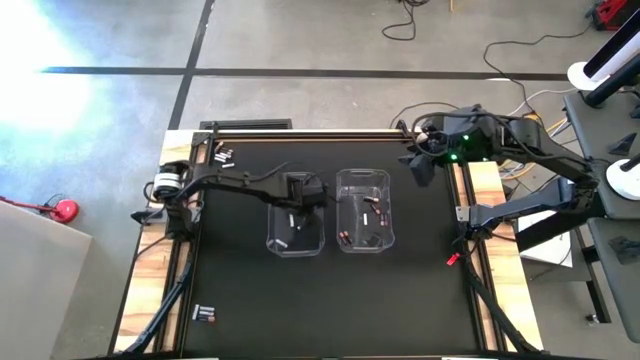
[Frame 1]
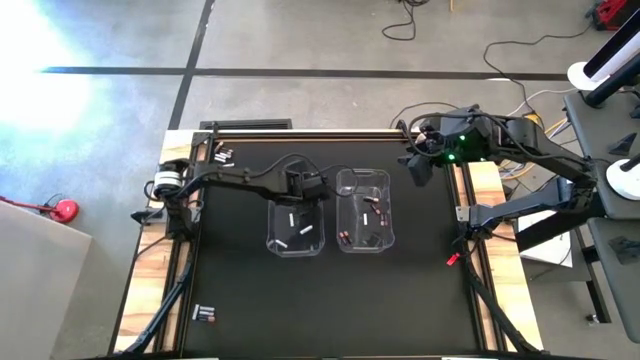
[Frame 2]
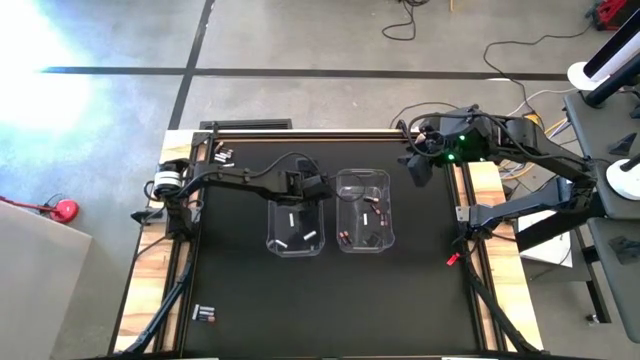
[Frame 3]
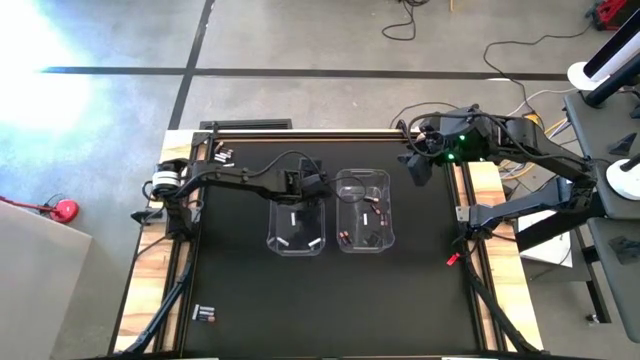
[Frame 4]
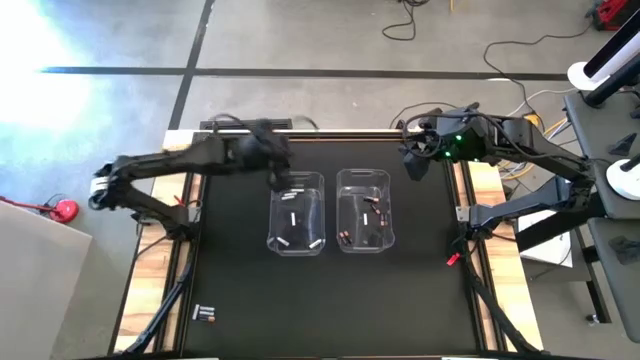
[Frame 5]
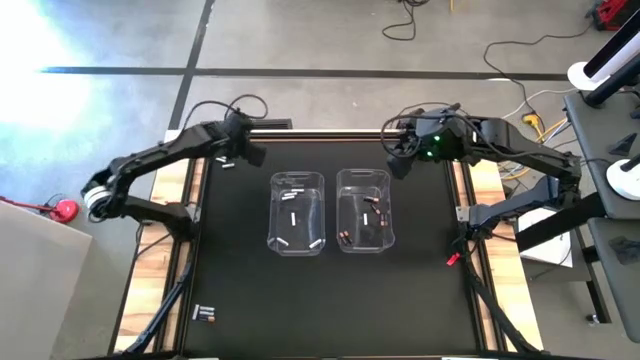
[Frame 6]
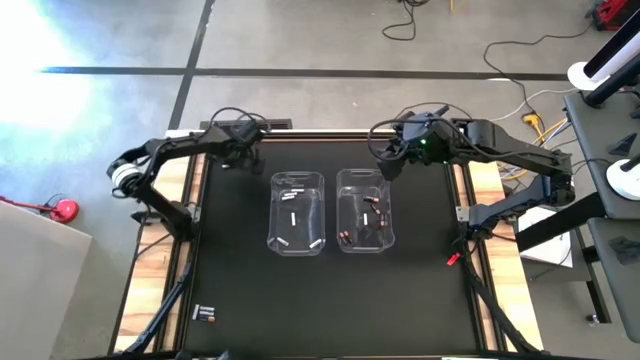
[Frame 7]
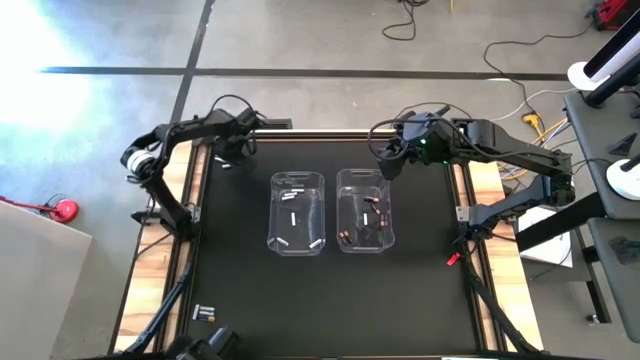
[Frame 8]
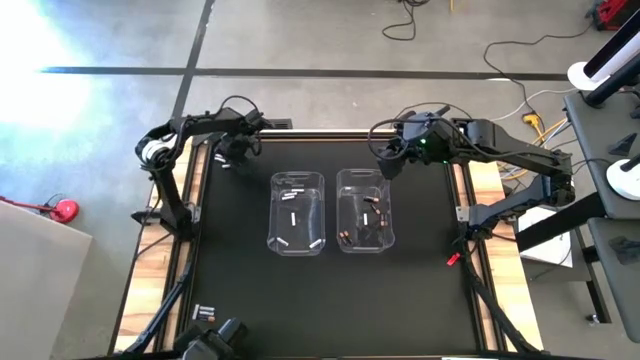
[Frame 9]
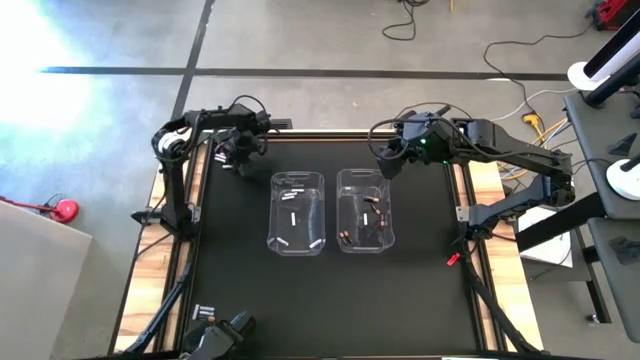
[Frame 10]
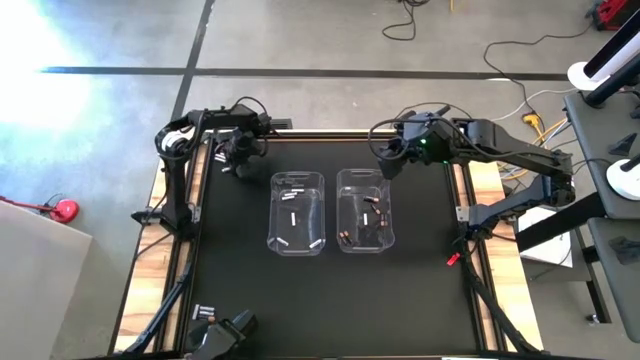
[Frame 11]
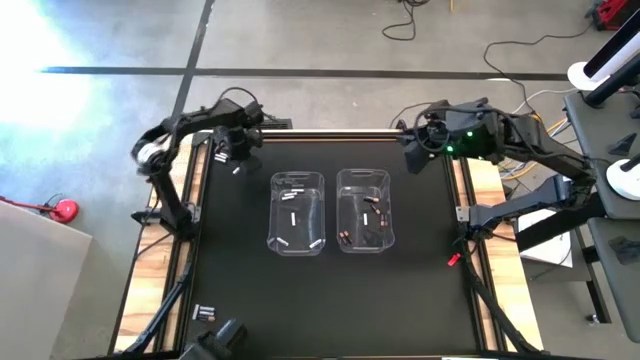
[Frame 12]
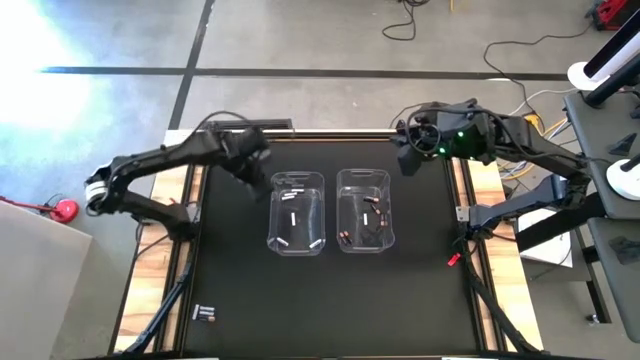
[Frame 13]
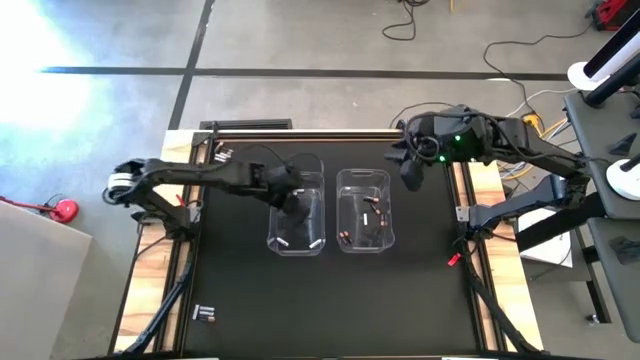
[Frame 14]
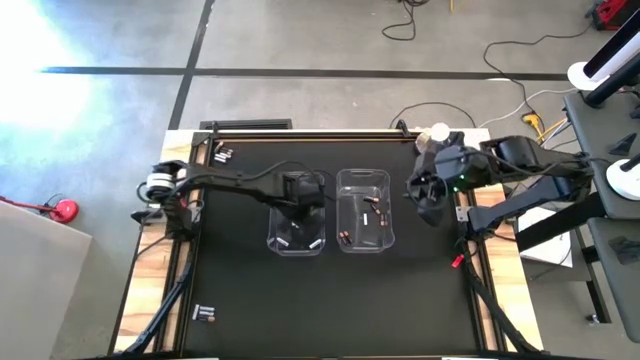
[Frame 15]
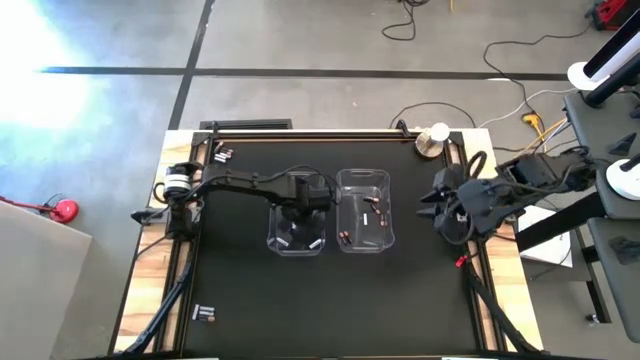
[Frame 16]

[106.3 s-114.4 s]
Task: Sort batteries
Put the white battery into the left transparent bin

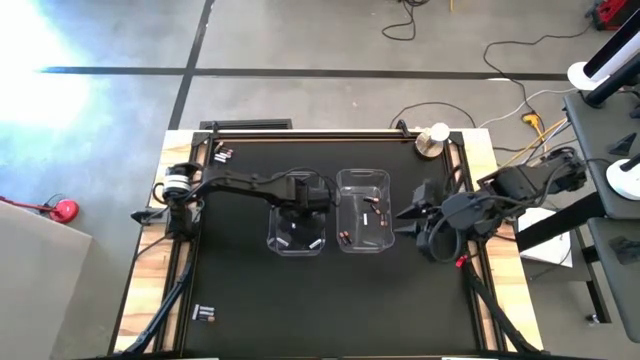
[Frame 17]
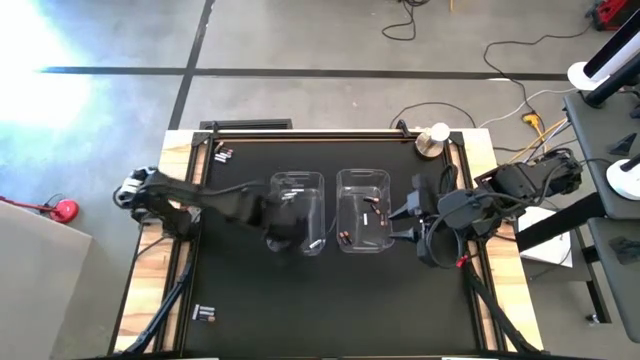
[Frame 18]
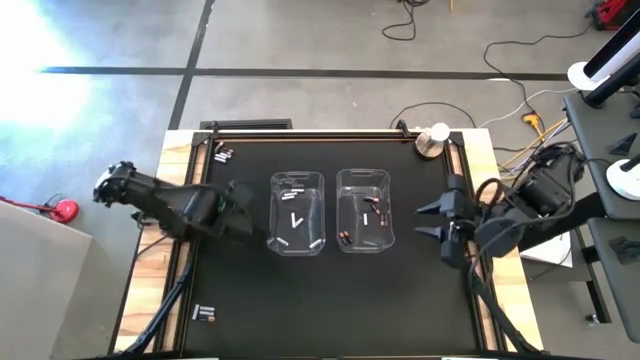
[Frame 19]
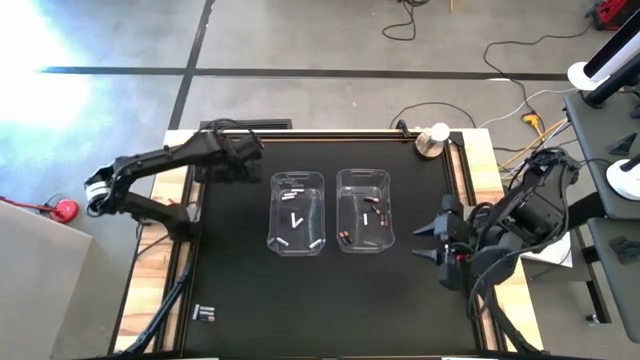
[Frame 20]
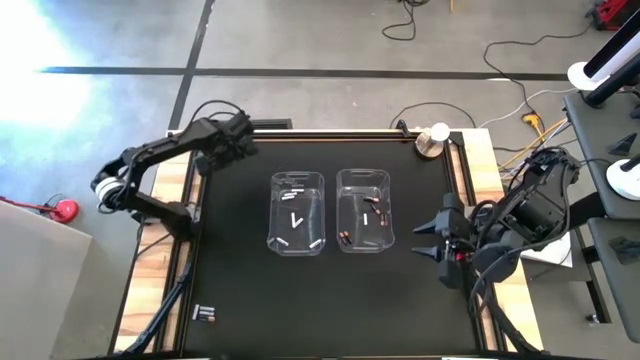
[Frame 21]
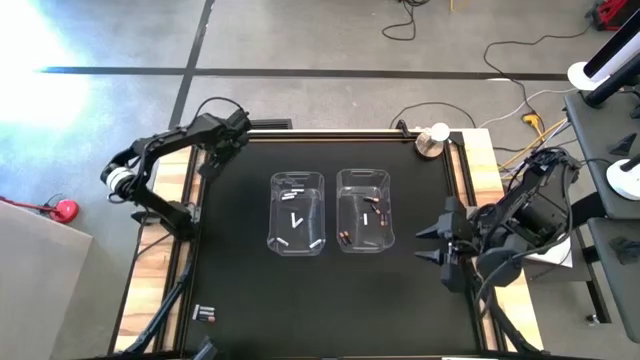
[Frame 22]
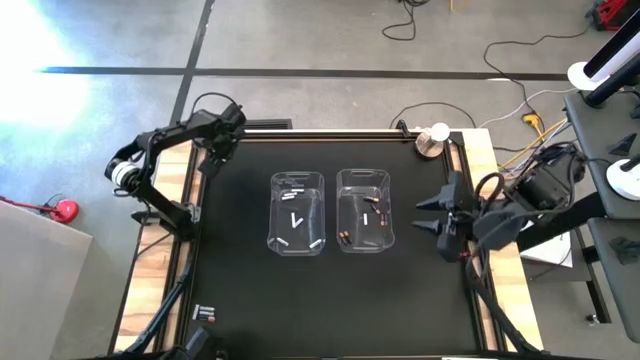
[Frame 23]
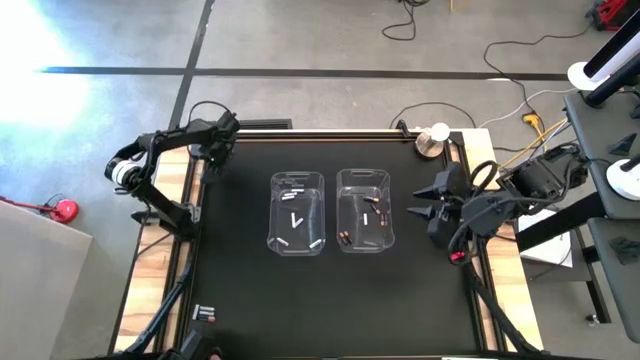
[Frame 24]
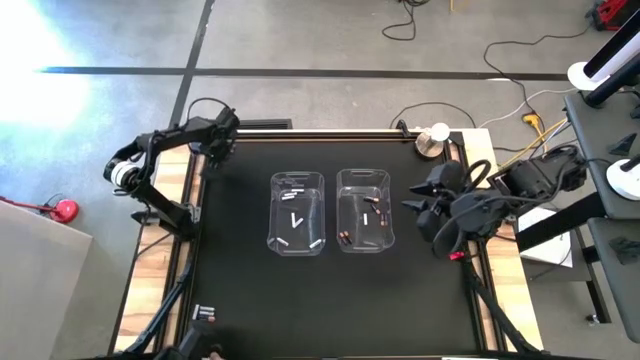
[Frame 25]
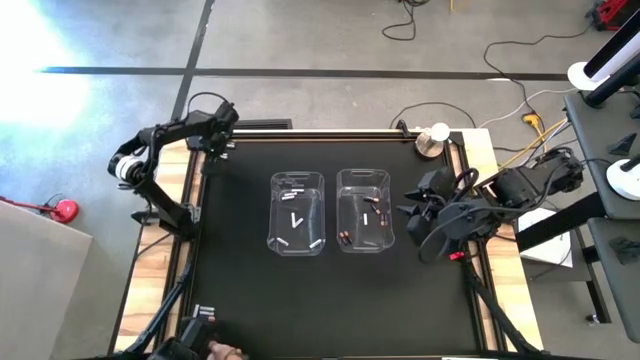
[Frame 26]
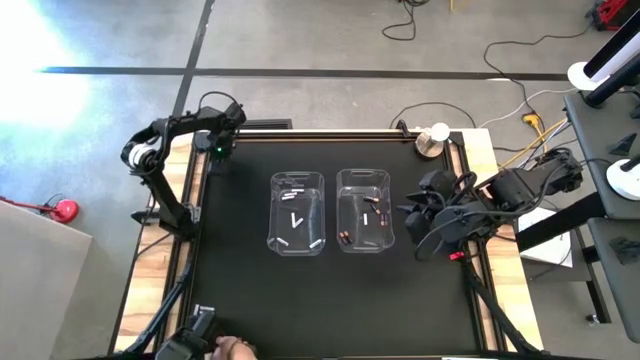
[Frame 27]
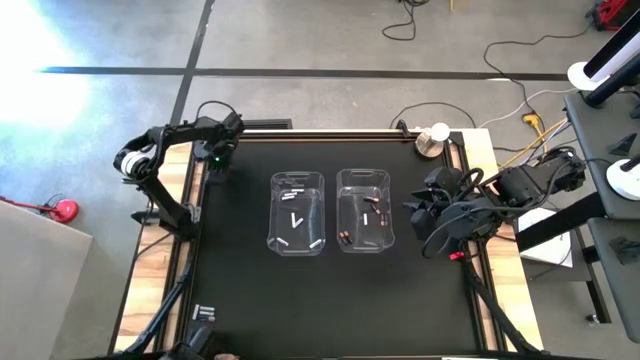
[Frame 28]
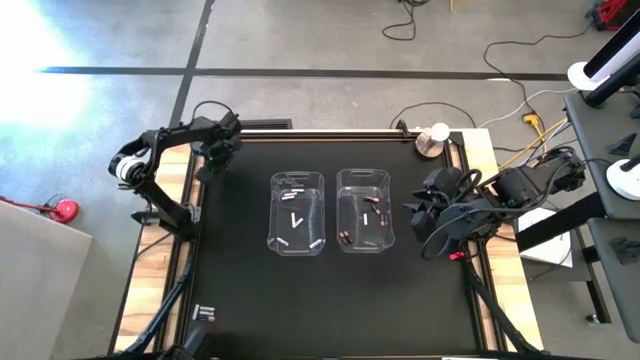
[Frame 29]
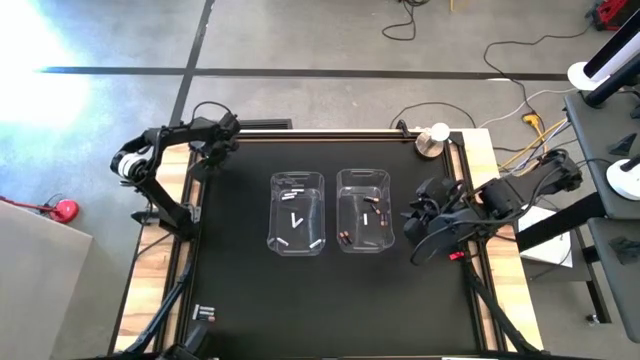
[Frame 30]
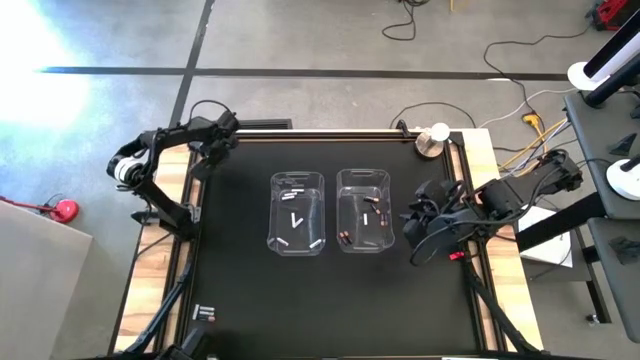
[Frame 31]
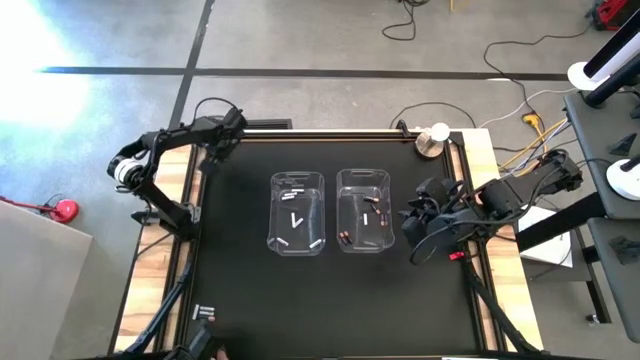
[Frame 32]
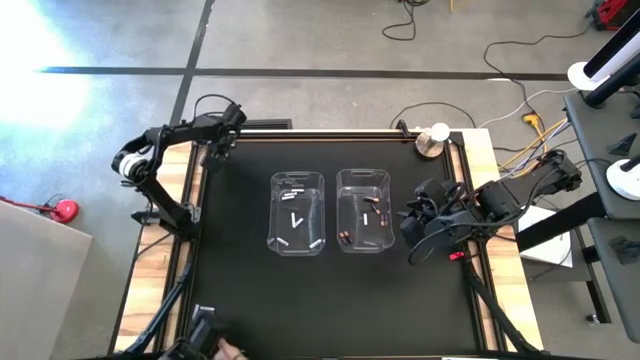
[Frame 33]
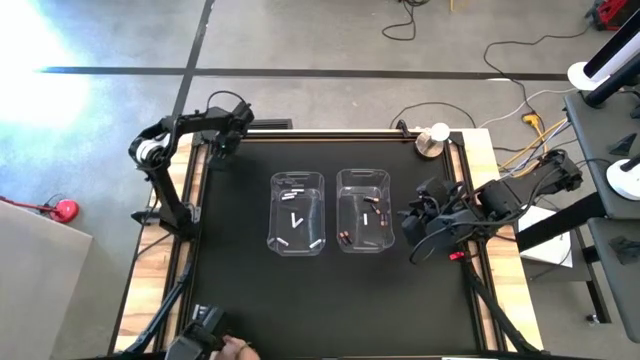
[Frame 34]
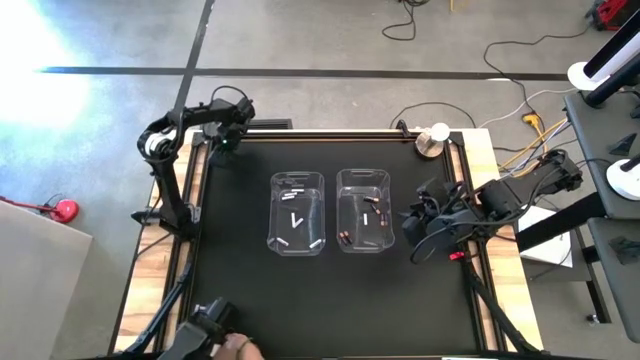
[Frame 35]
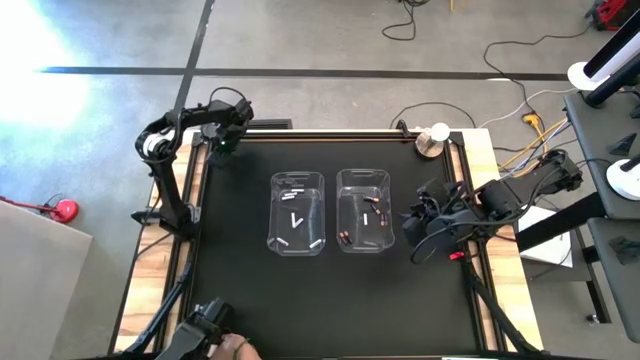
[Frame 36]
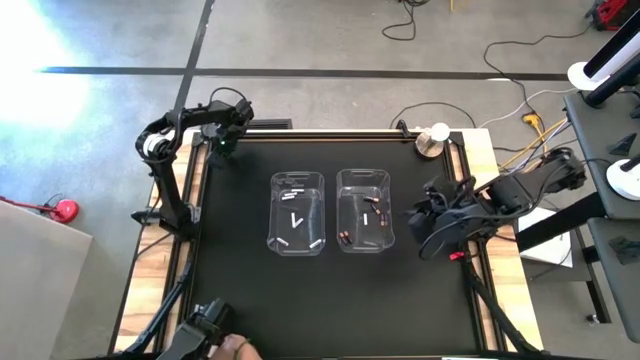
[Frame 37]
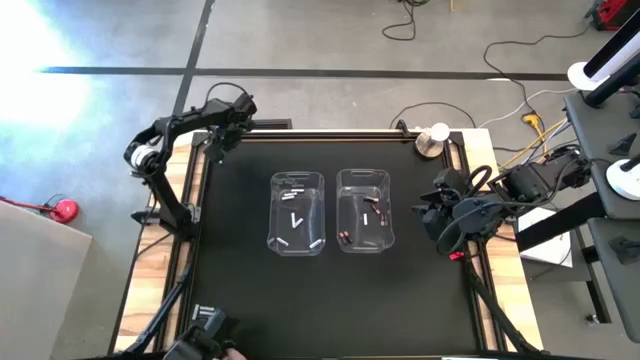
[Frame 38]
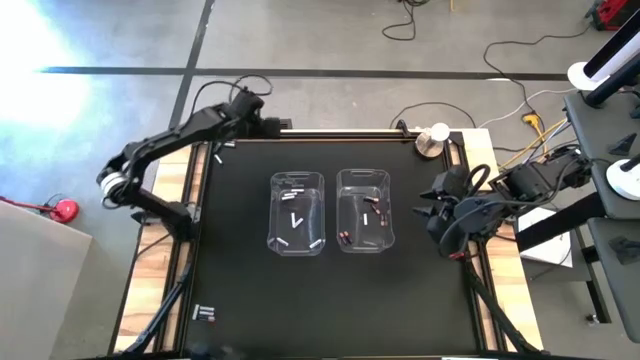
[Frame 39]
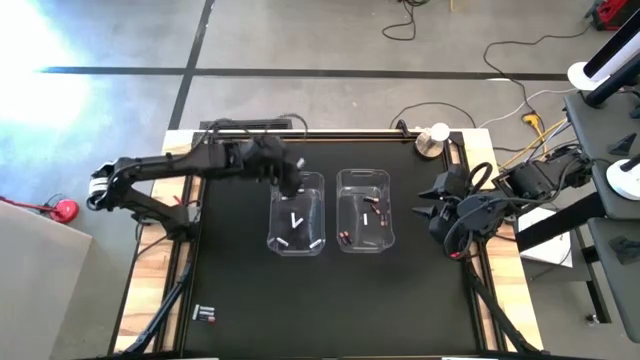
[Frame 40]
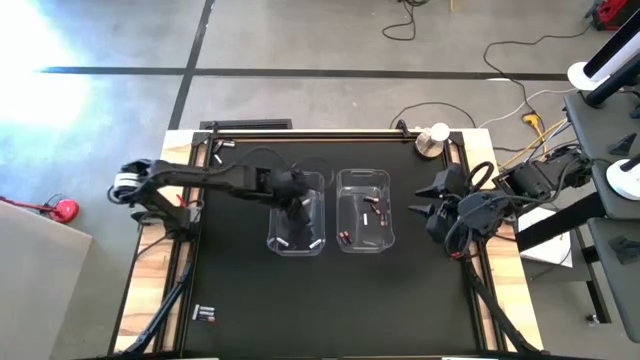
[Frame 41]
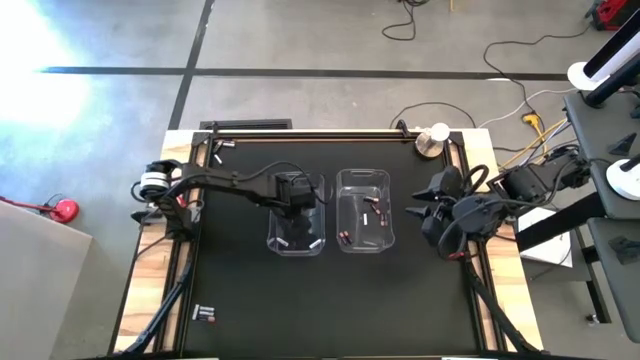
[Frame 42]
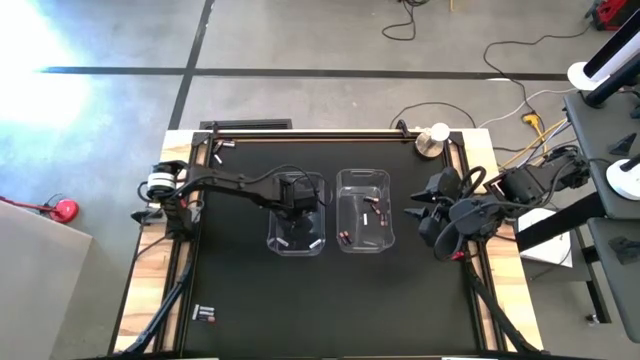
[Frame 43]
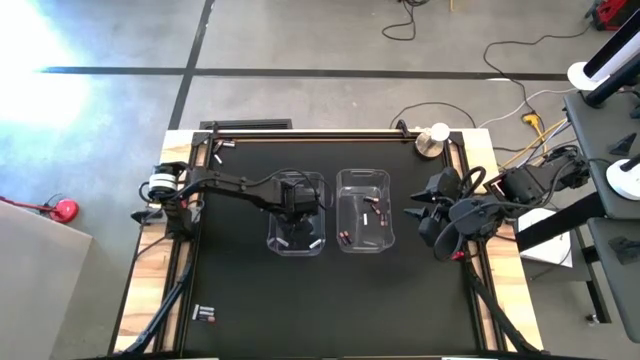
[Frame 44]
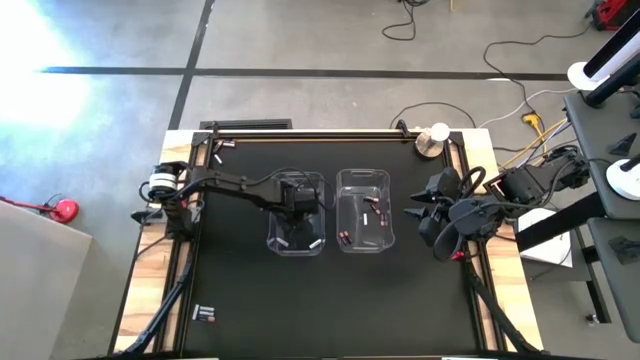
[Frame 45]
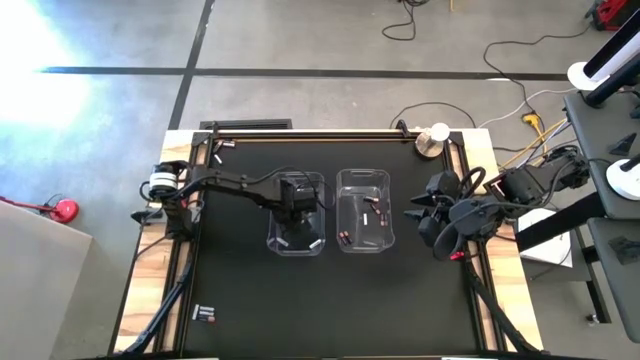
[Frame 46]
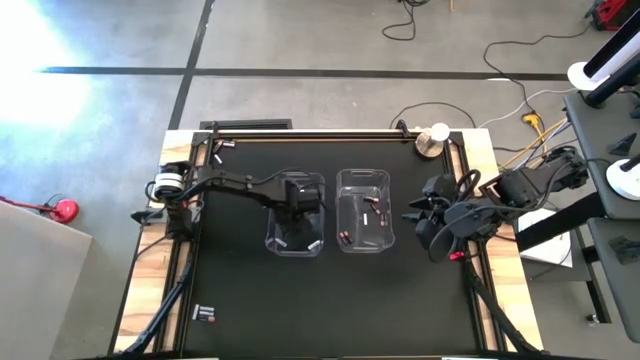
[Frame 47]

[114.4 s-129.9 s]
Put the white battery into the left transparent bin
